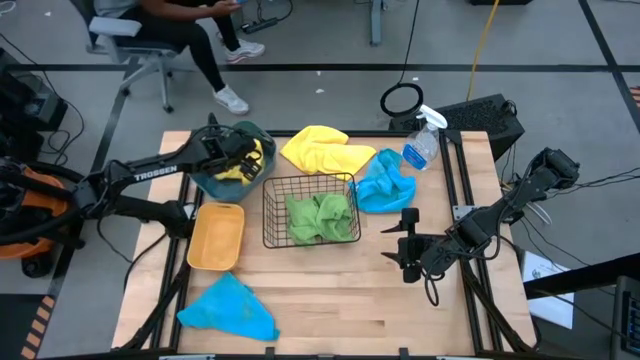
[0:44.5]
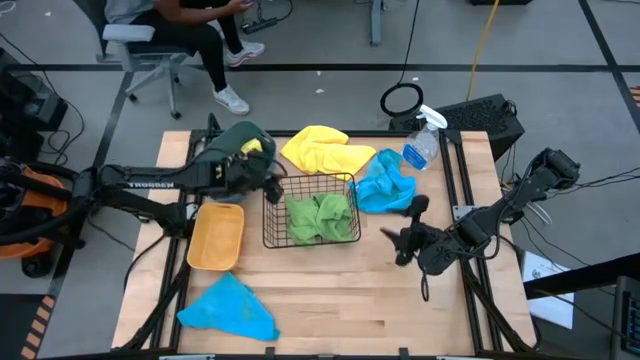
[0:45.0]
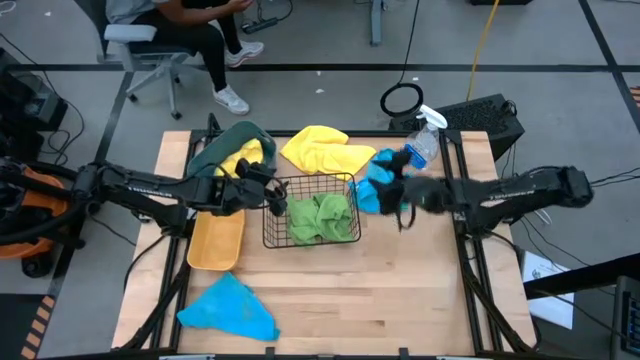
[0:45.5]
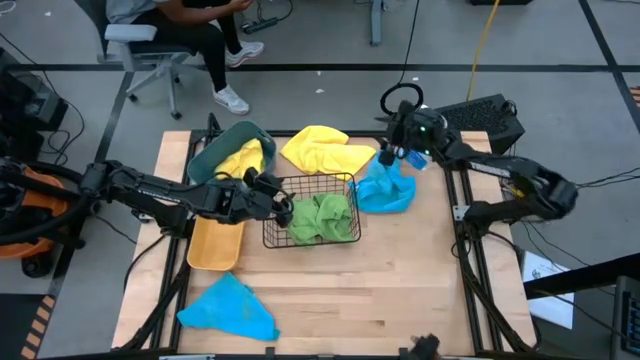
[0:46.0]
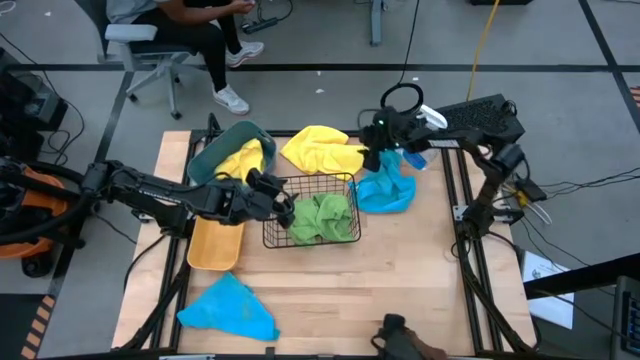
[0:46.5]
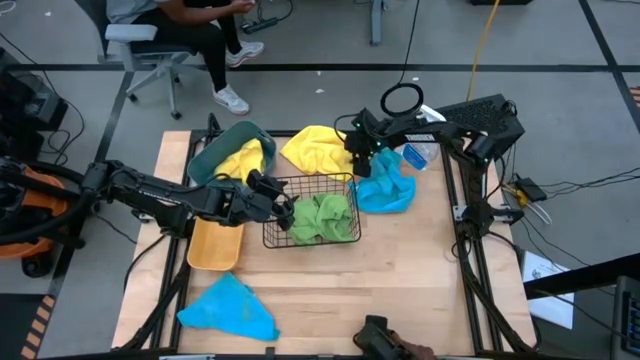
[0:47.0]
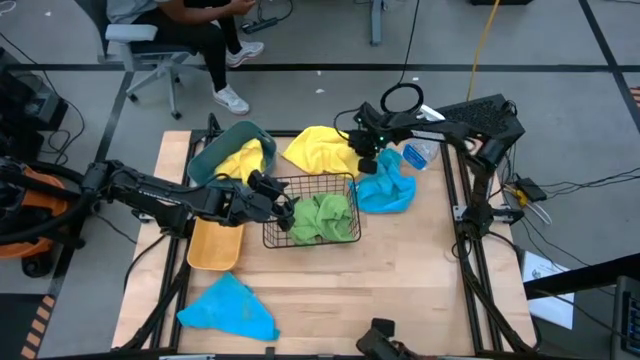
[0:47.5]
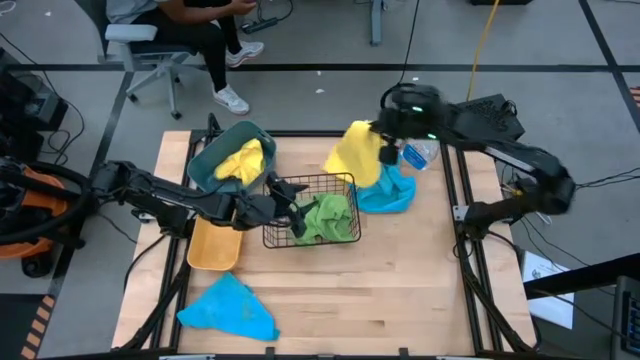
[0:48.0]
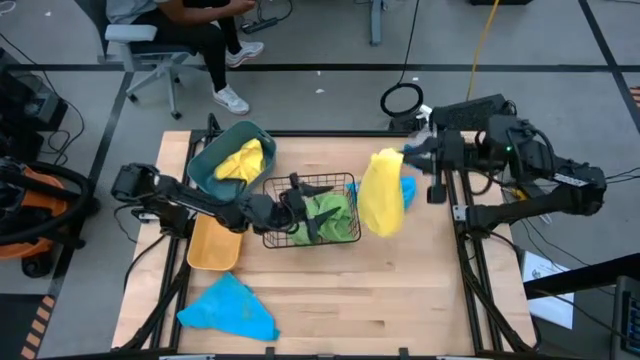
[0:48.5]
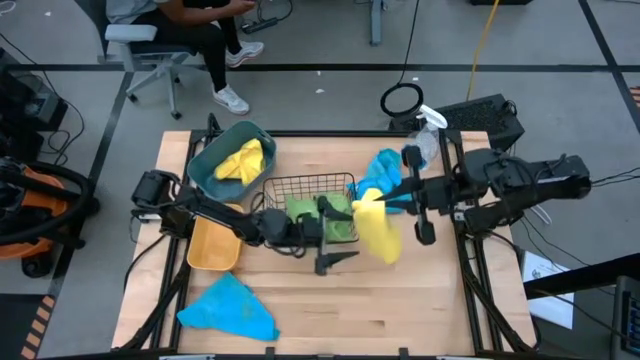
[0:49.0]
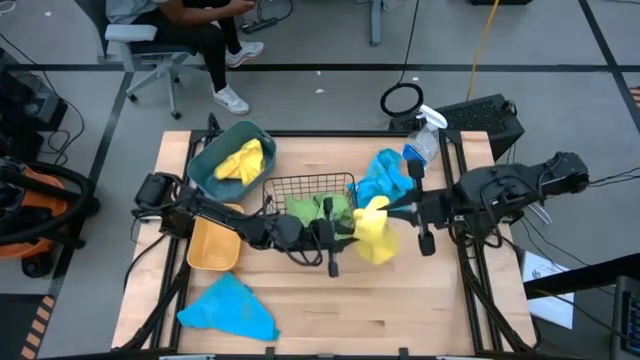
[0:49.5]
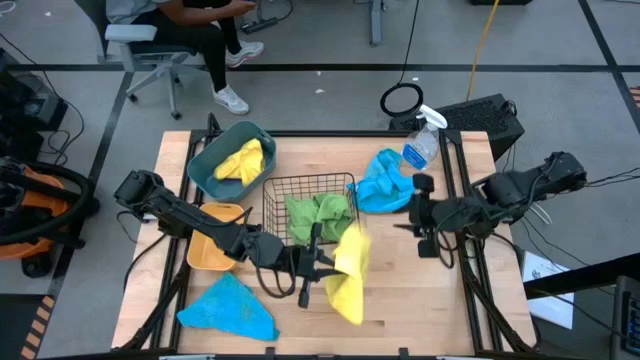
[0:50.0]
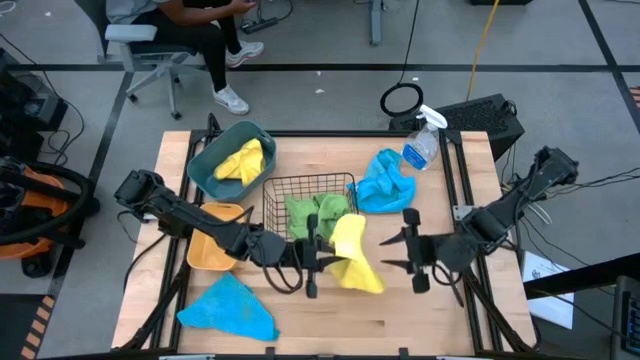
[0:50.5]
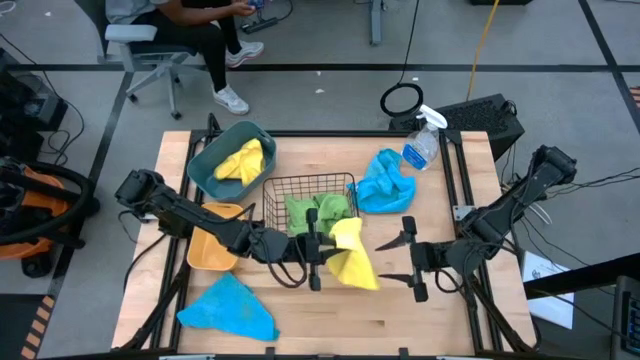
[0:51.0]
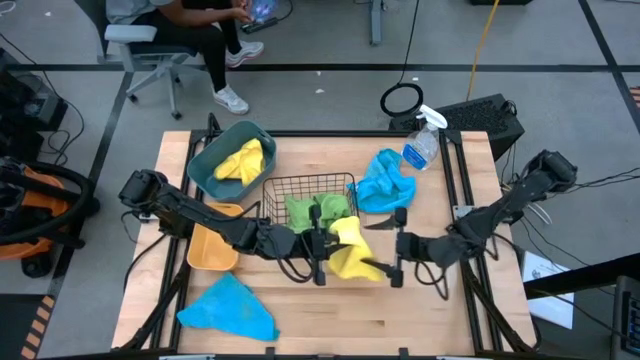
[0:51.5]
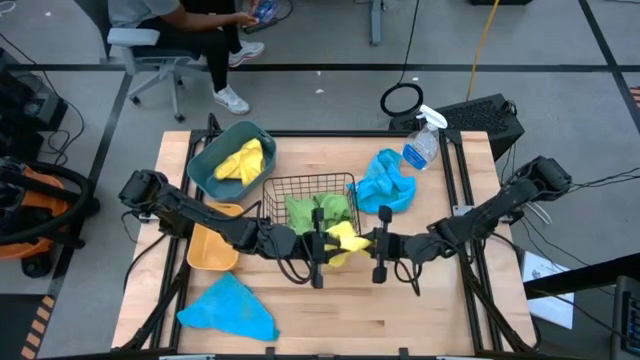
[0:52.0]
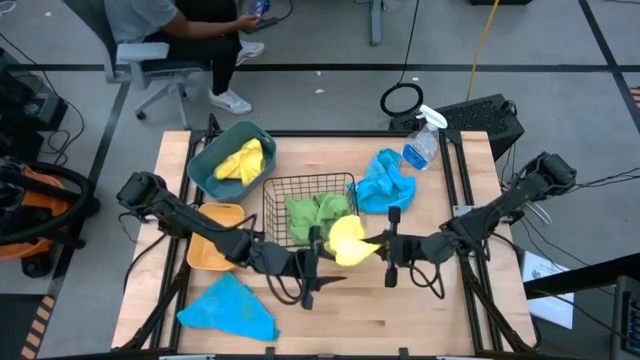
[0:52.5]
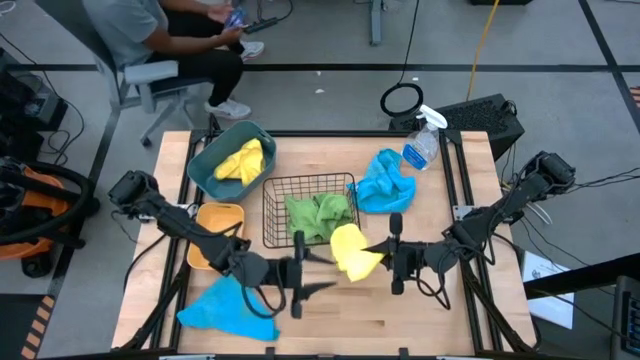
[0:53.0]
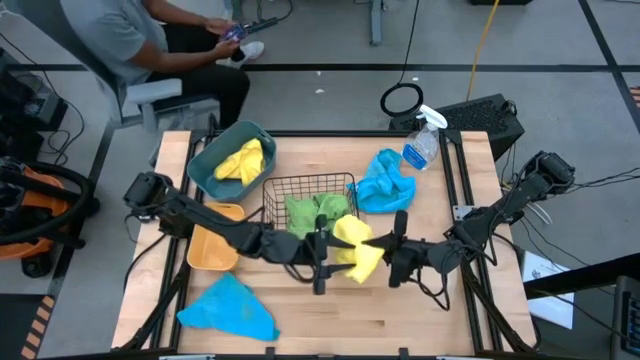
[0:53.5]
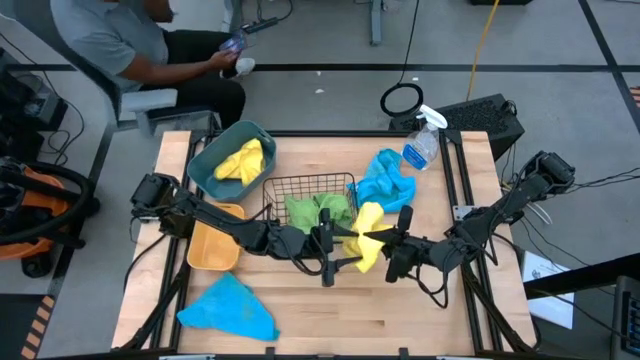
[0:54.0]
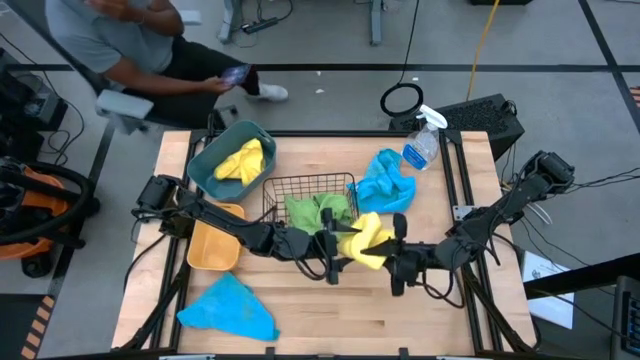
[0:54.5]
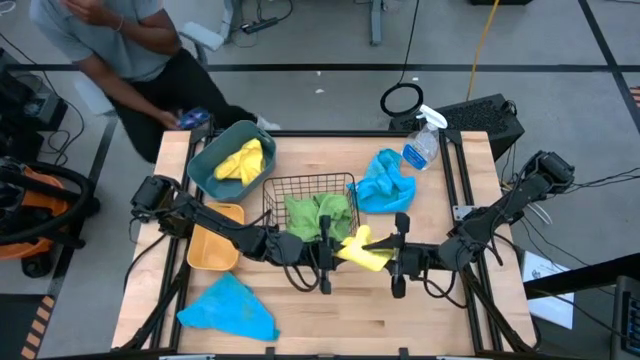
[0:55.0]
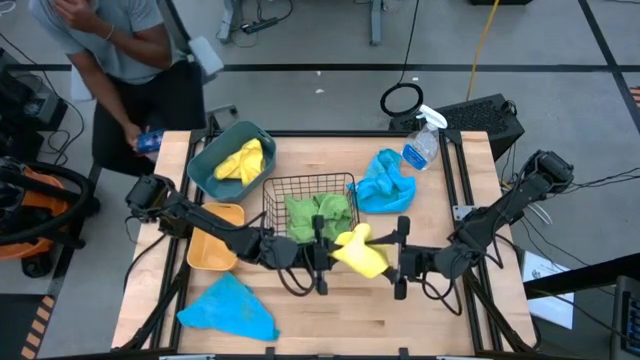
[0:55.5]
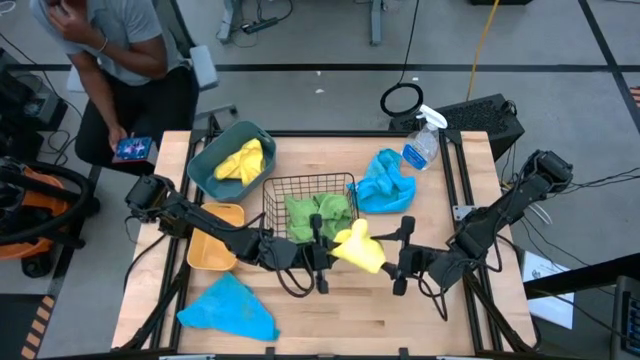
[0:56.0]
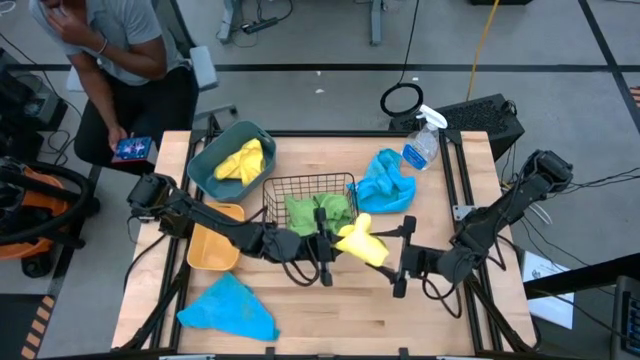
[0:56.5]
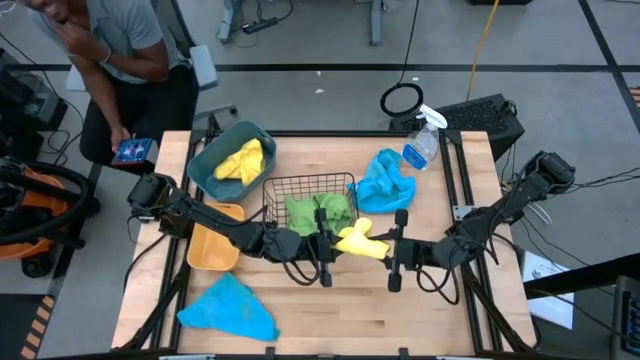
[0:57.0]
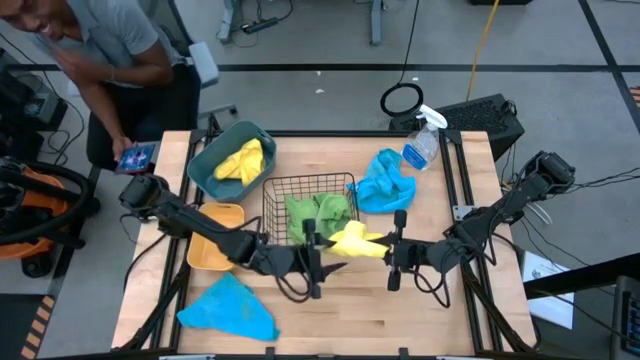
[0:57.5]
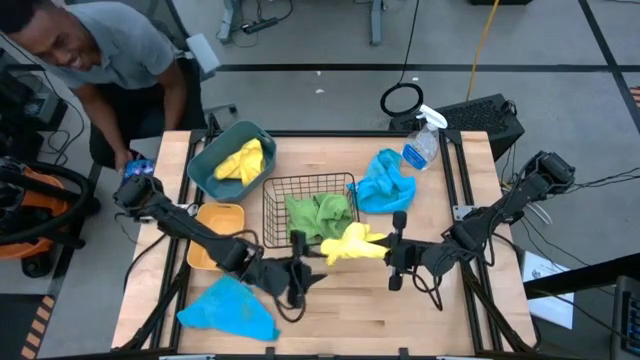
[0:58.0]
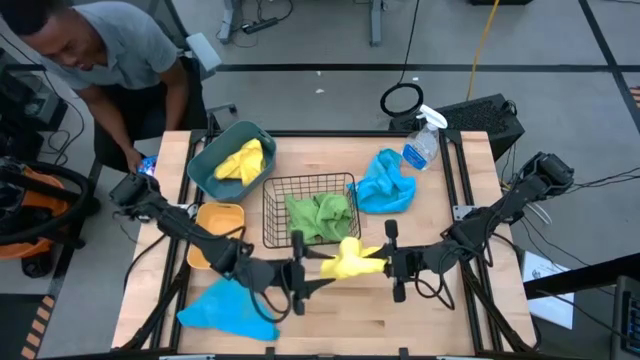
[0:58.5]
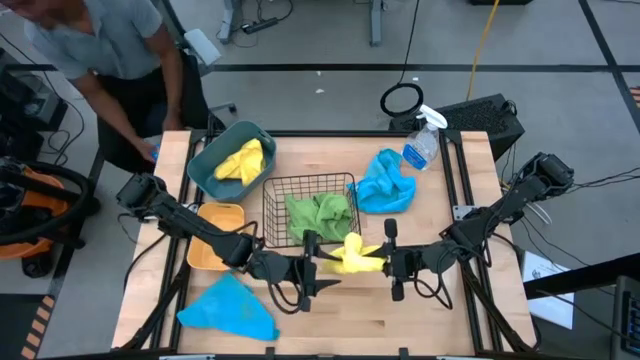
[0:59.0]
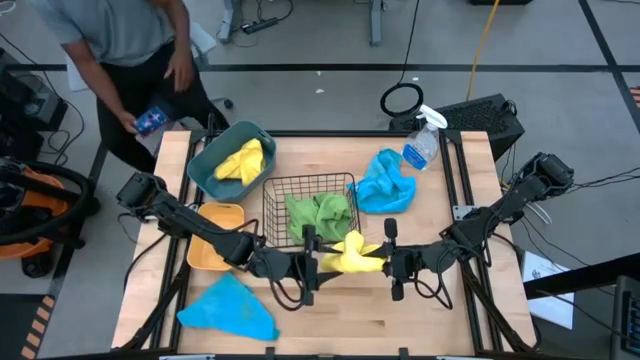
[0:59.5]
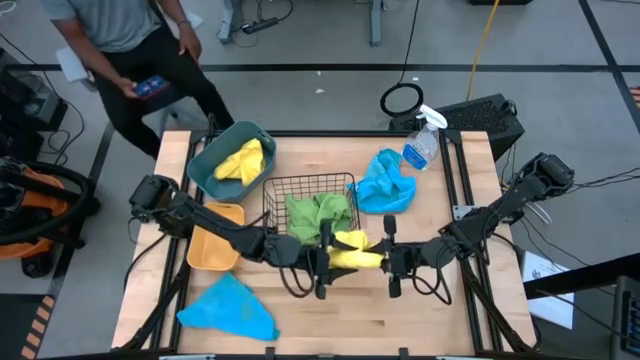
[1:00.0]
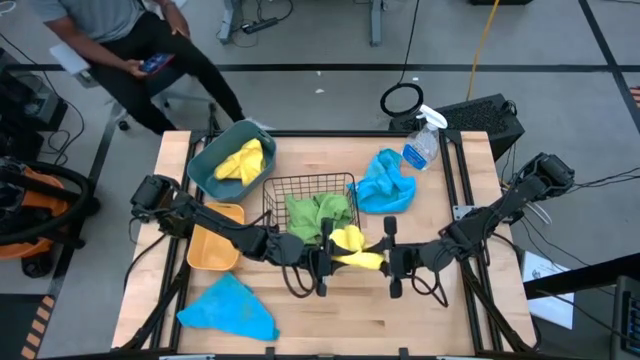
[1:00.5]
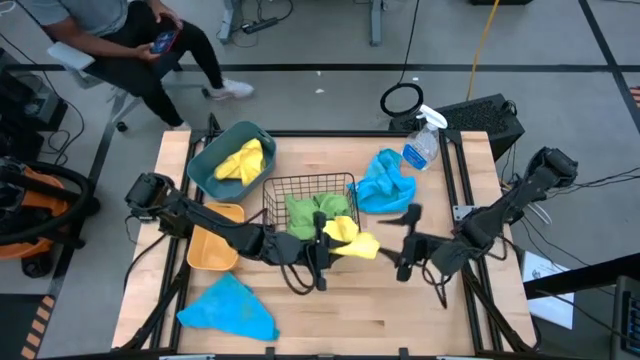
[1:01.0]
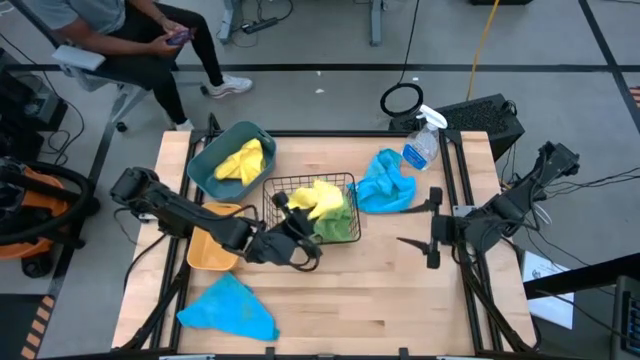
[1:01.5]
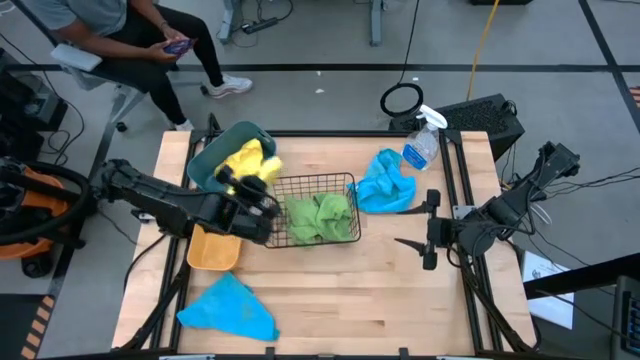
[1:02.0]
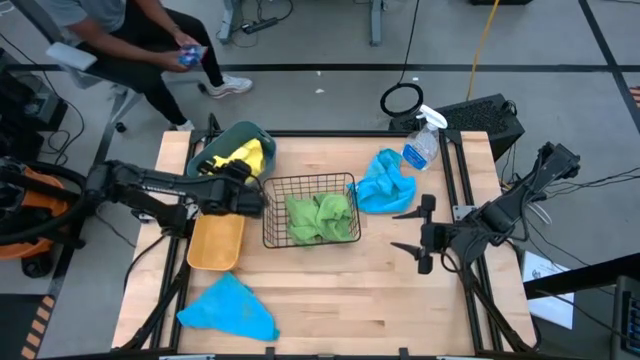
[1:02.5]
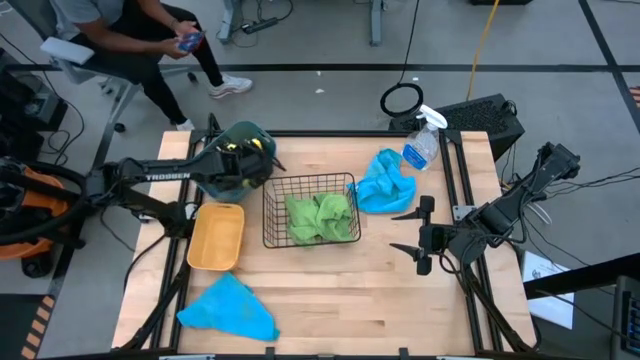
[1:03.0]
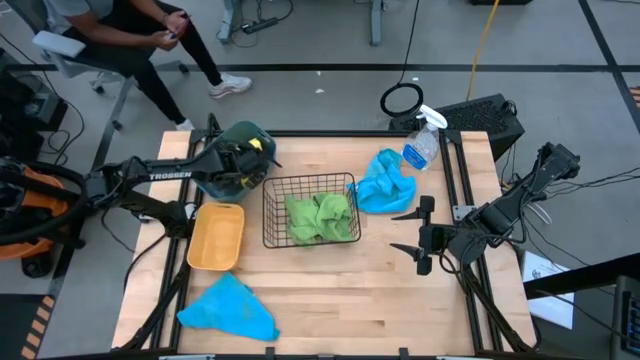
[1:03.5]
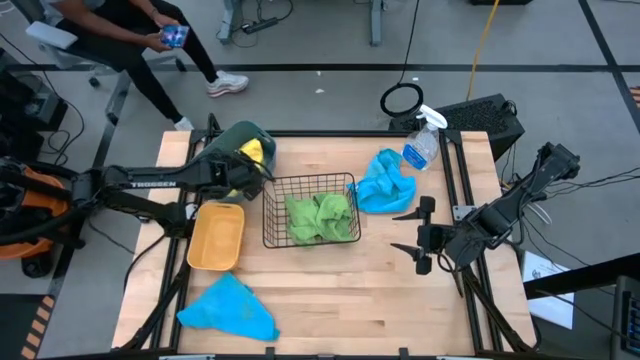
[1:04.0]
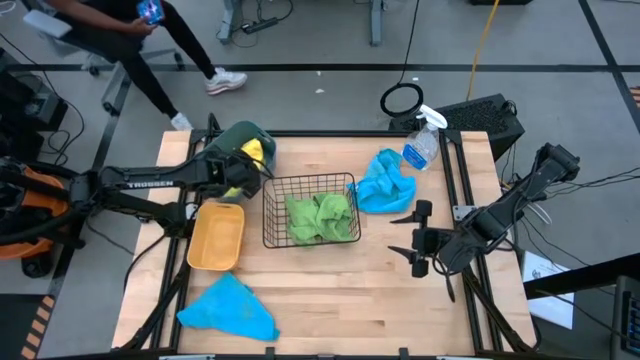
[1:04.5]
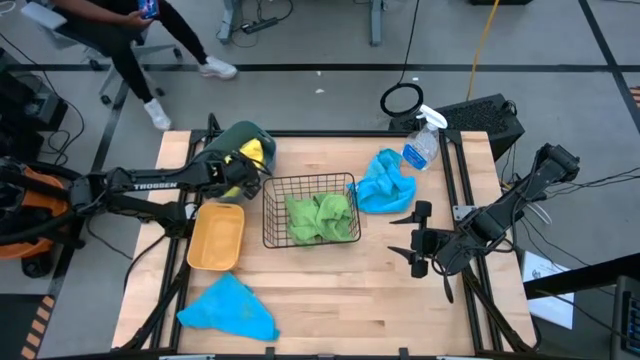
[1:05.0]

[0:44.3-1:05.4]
Task: Sort microfiber towel by color & place in baskets
Put the yellow microfiber towel into the blue bin

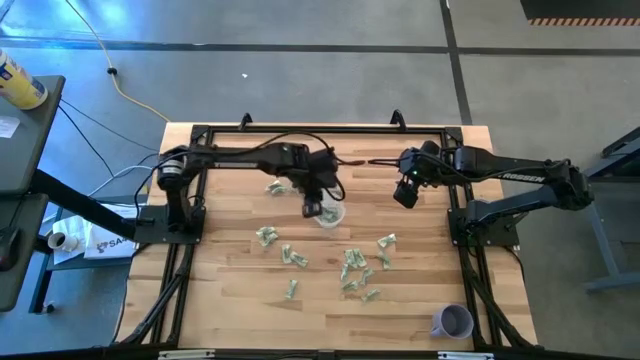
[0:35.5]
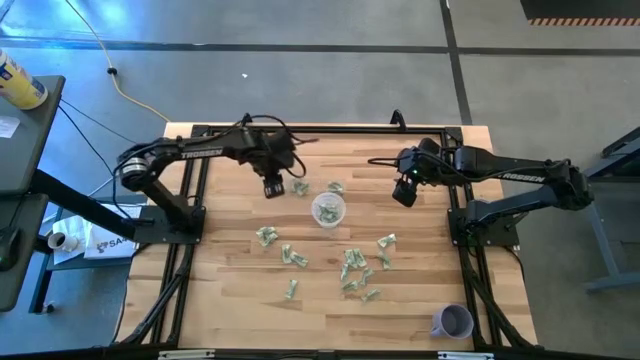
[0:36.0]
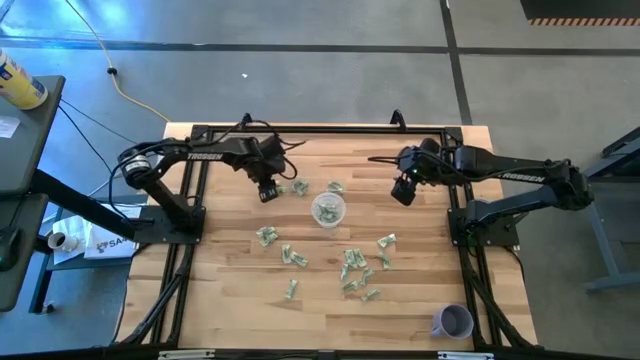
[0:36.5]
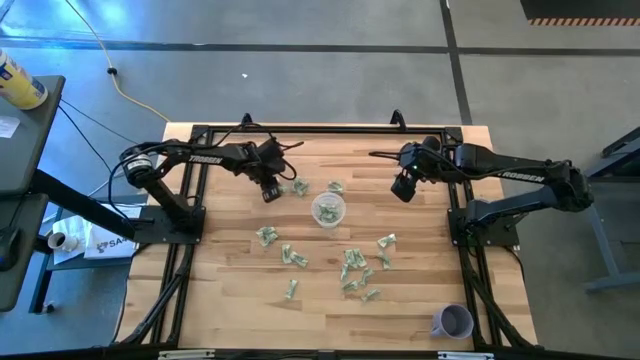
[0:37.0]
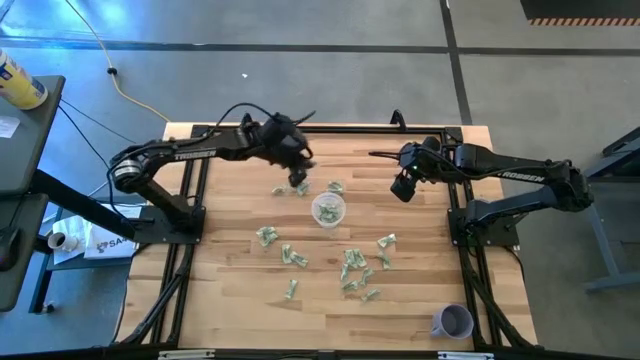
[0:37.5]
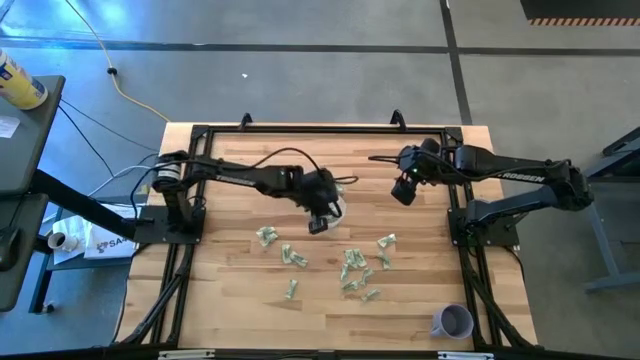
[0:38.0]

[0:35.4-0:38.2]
Task: Pick and place Stevia / Truvia into bins
Put the white stevia packet into the transparent container
